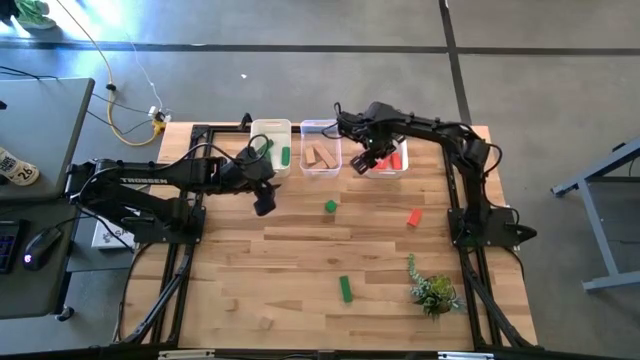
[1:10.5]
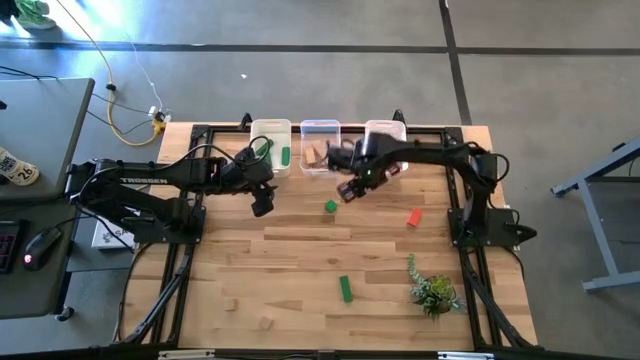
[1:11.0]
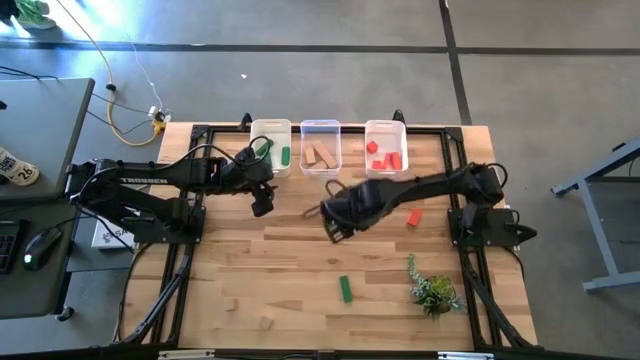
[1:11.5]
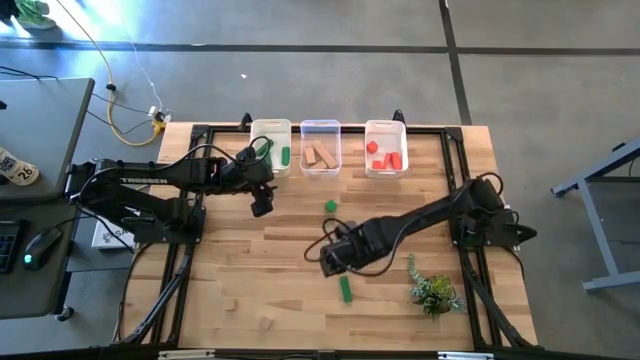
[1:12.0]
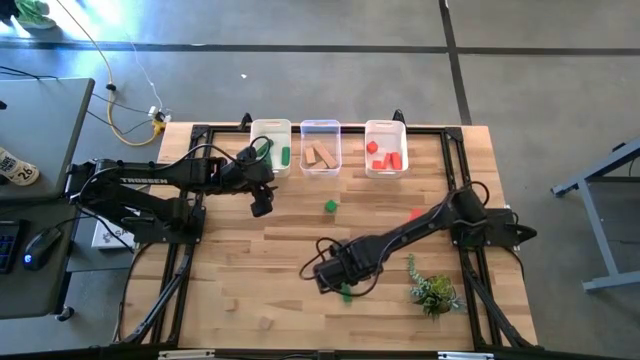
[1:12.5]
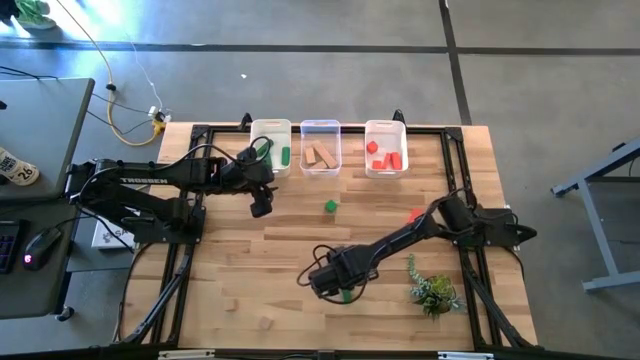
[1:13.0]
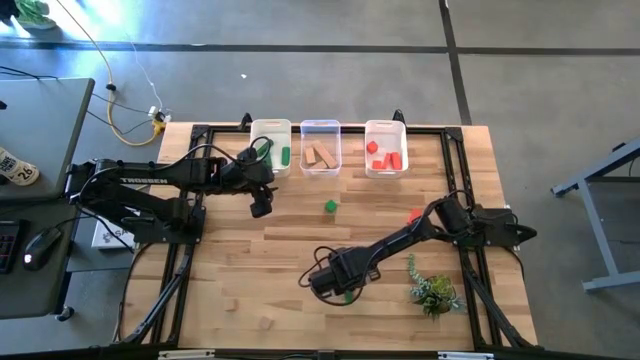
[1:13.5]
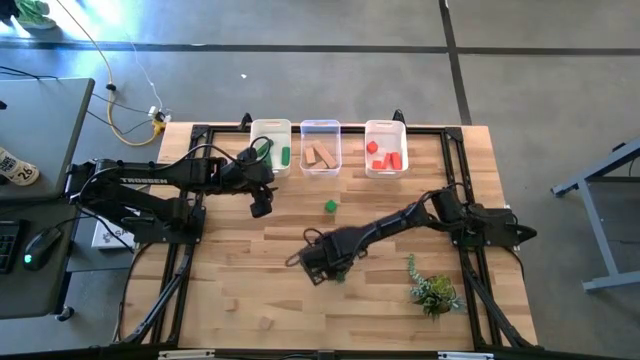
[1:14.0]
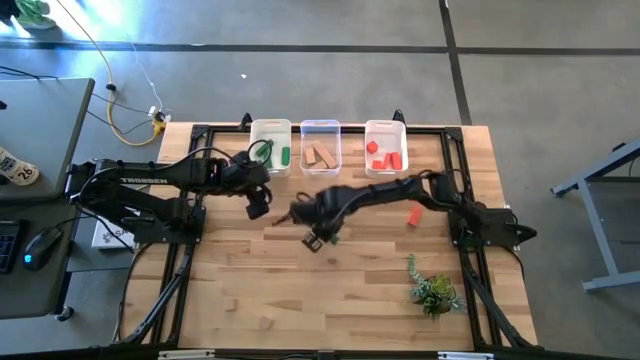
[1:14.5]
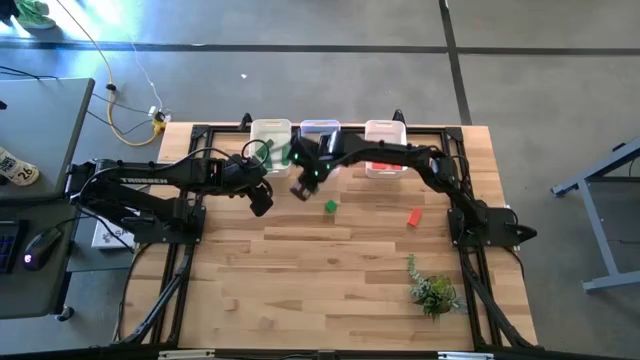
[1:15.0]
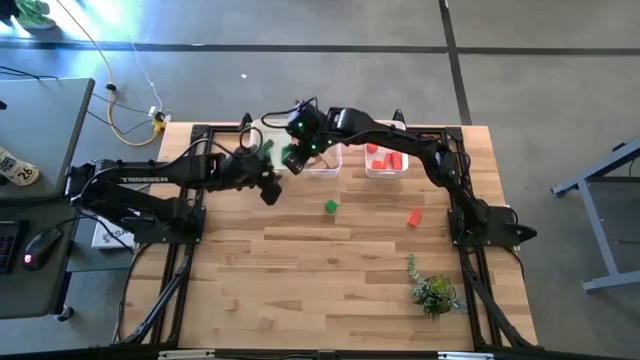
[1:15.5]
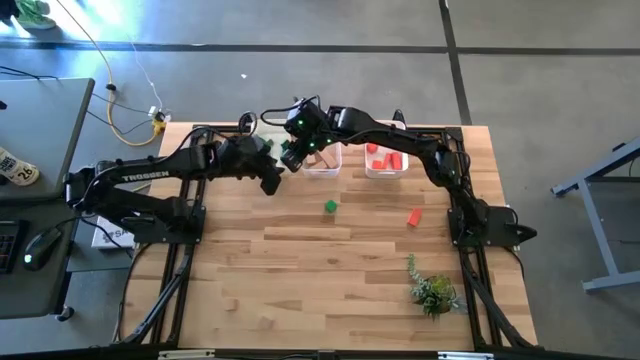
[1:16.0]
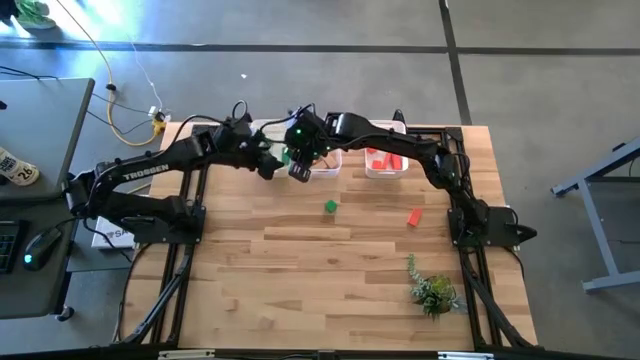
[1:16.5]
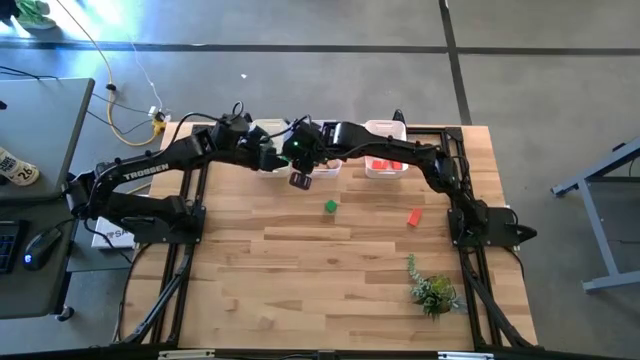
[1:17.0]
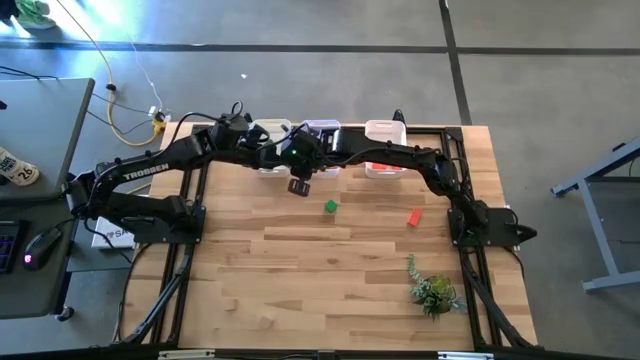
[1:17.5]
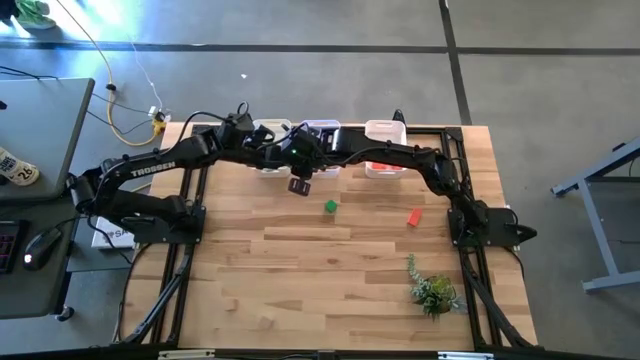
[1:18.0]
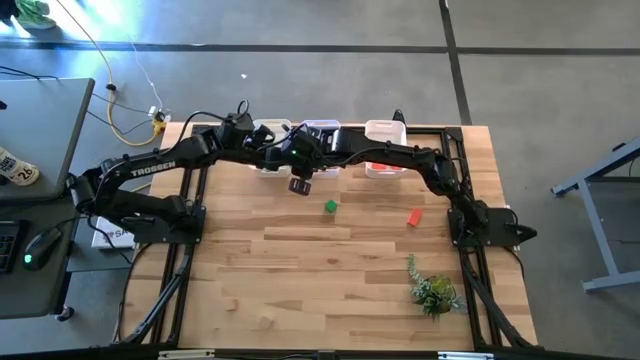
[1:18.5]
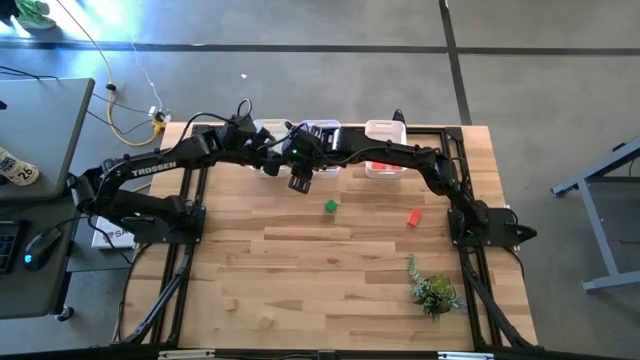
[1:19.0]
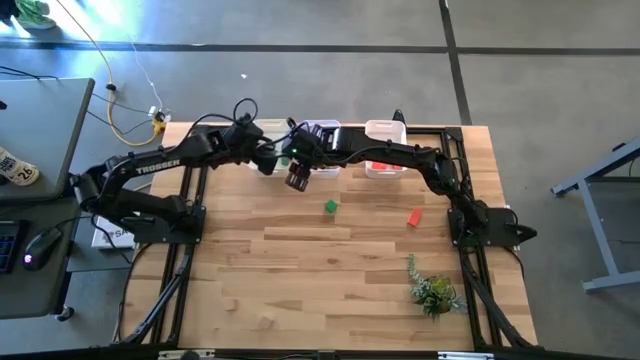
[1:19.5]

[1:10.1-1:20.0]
Task: Sort & place blocks by color
Put the green block into the left white bin

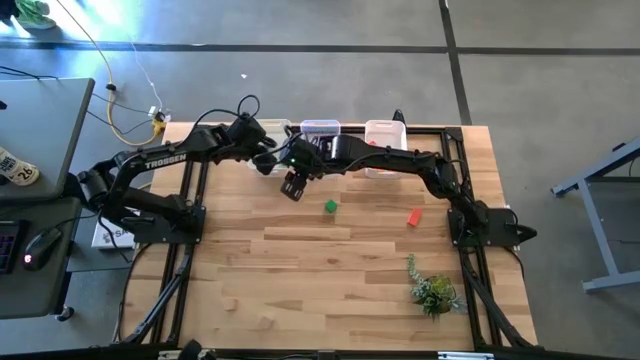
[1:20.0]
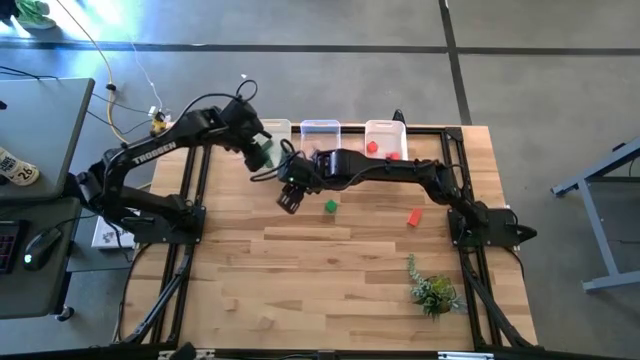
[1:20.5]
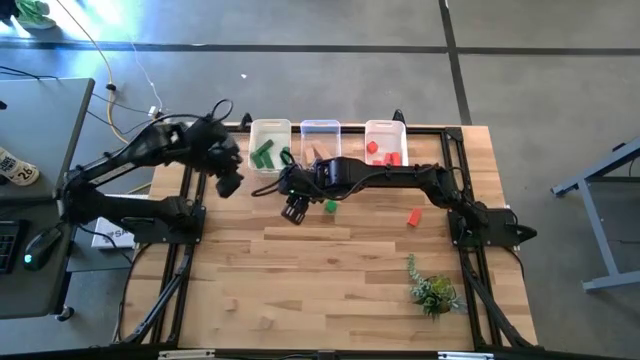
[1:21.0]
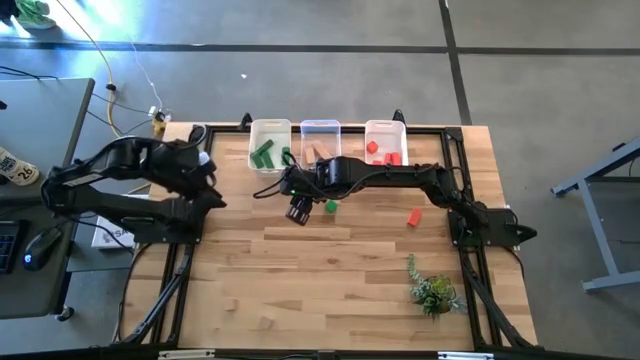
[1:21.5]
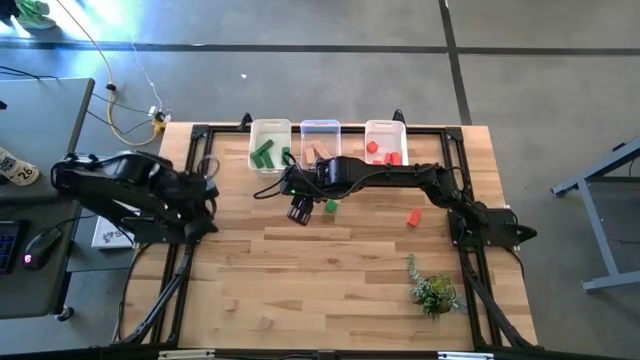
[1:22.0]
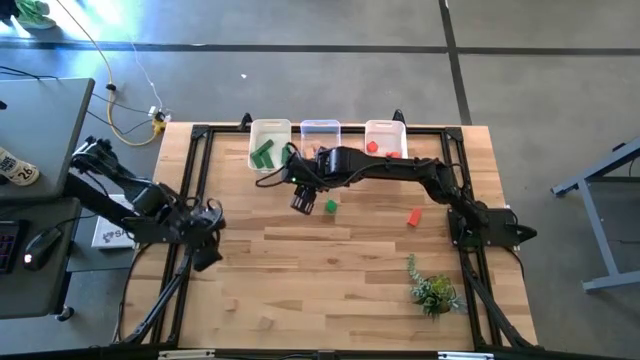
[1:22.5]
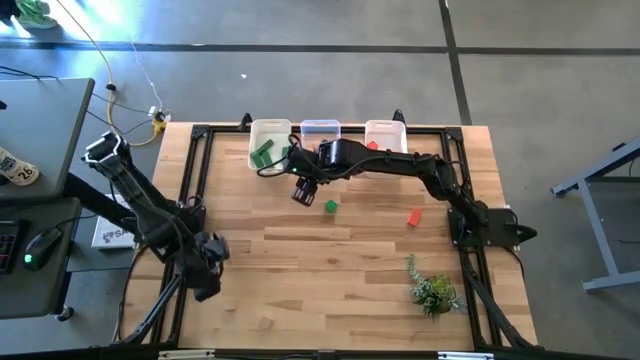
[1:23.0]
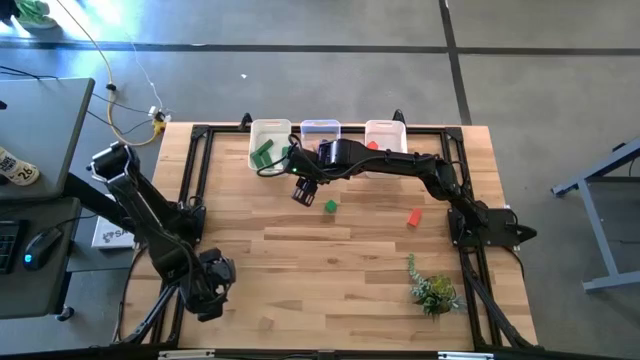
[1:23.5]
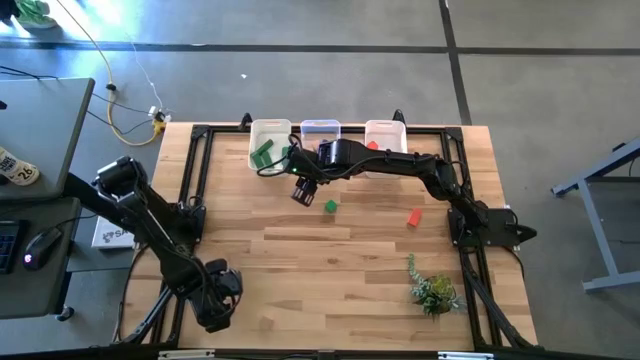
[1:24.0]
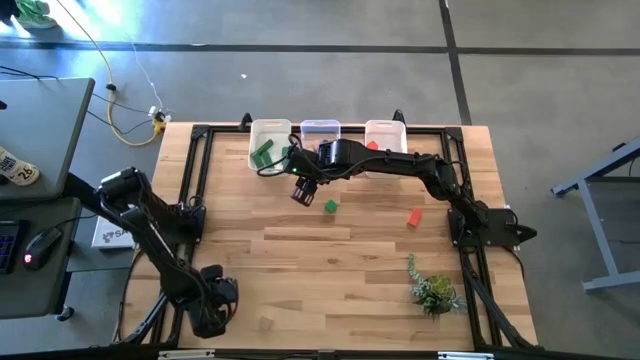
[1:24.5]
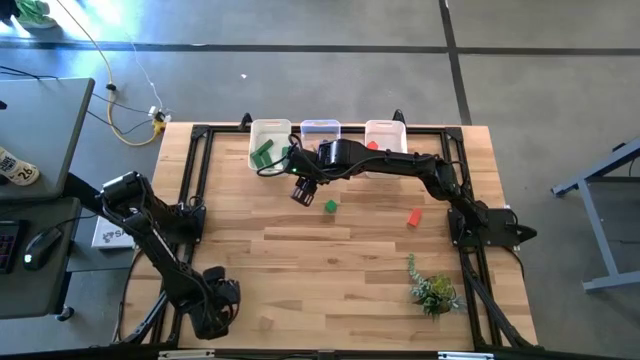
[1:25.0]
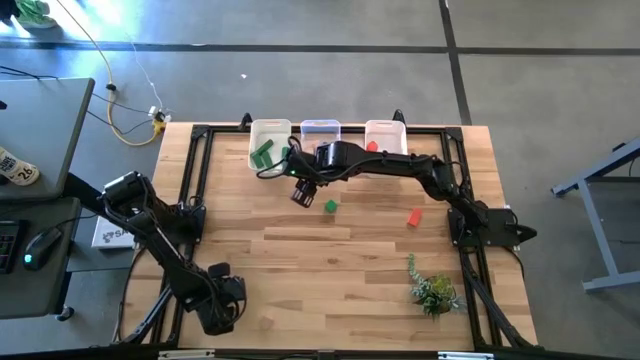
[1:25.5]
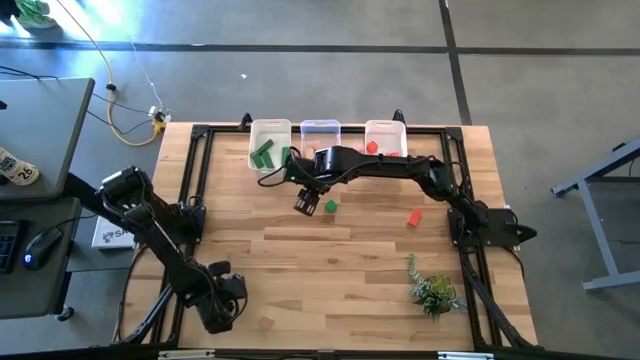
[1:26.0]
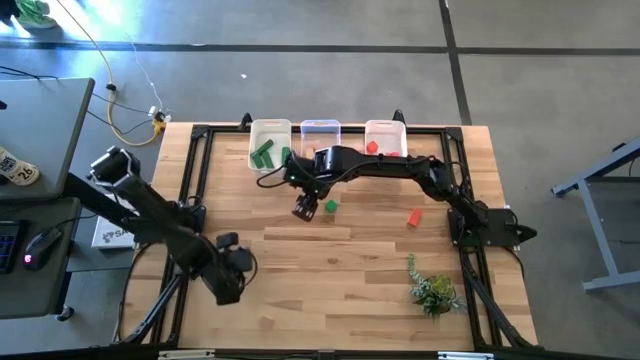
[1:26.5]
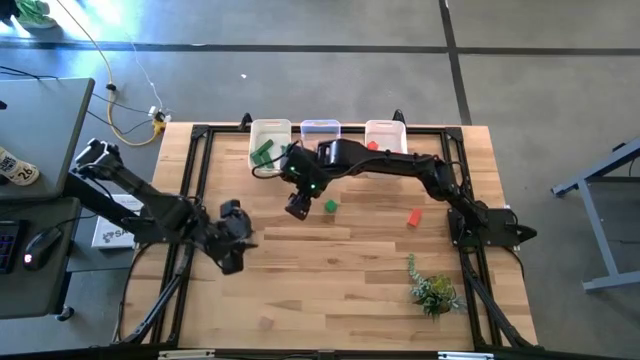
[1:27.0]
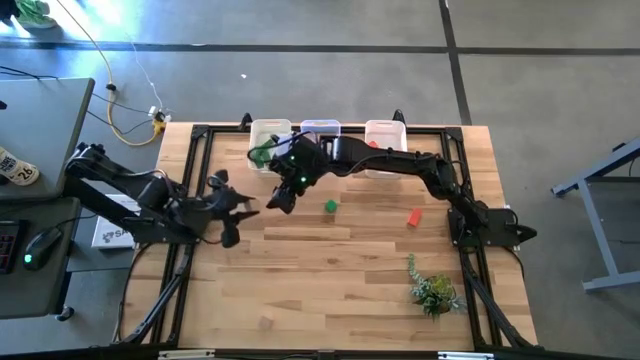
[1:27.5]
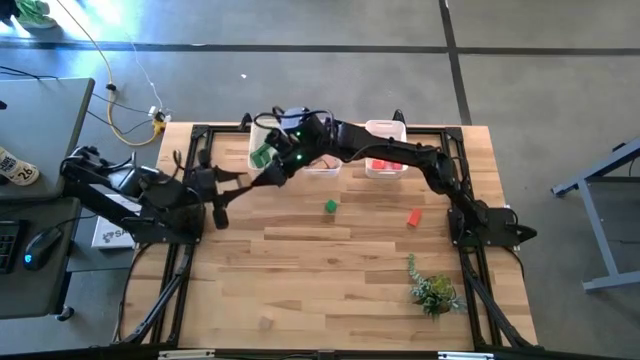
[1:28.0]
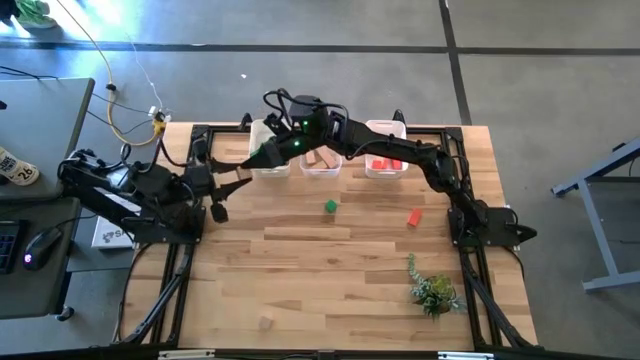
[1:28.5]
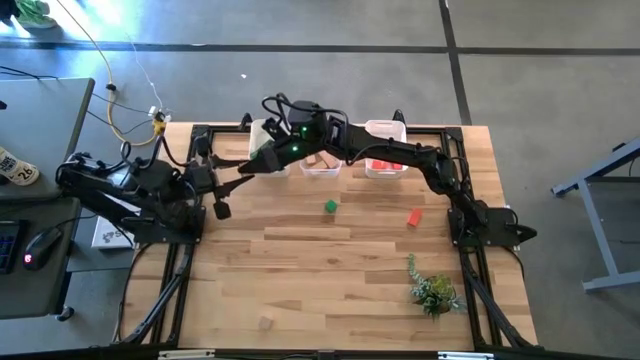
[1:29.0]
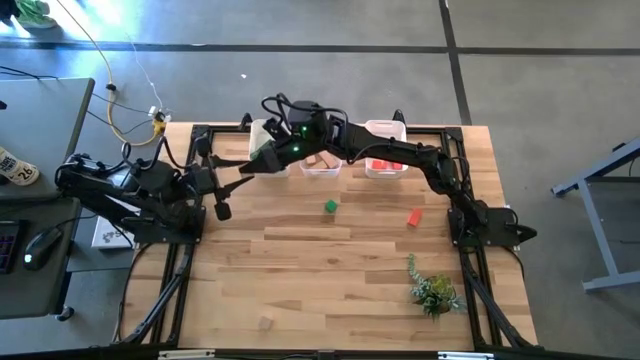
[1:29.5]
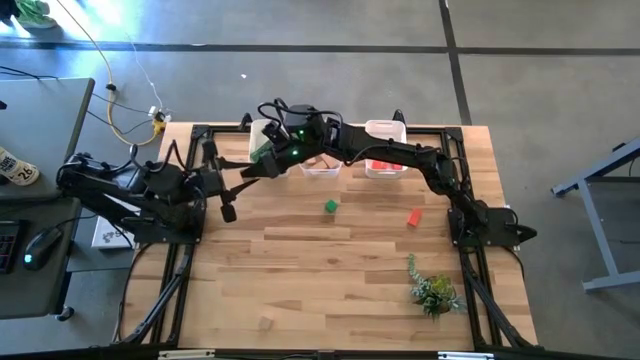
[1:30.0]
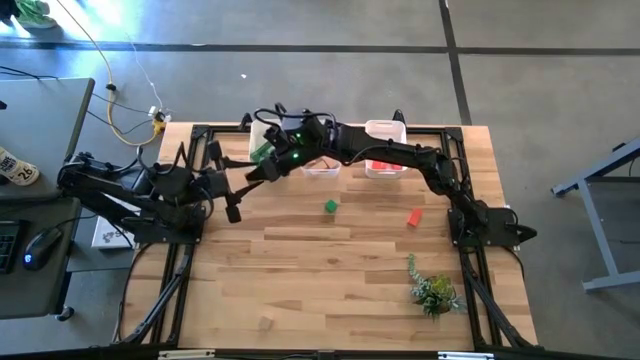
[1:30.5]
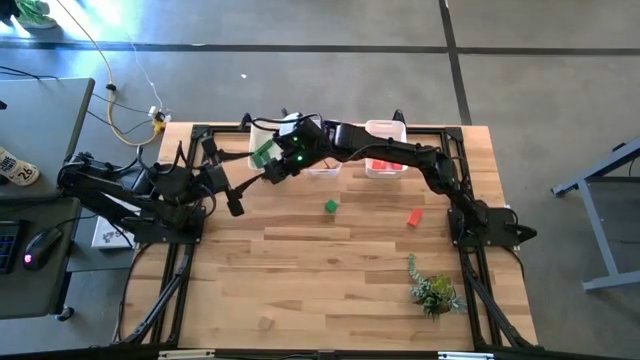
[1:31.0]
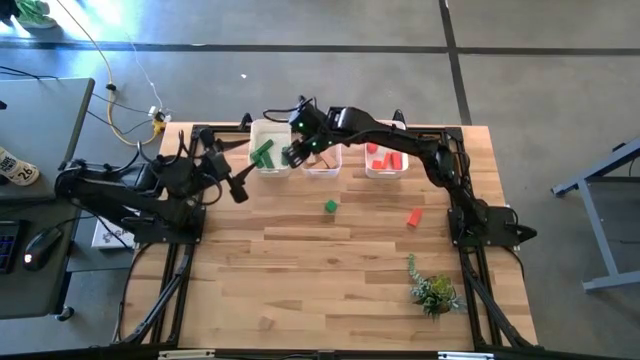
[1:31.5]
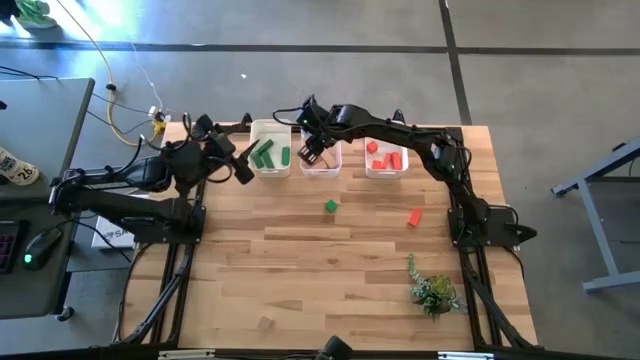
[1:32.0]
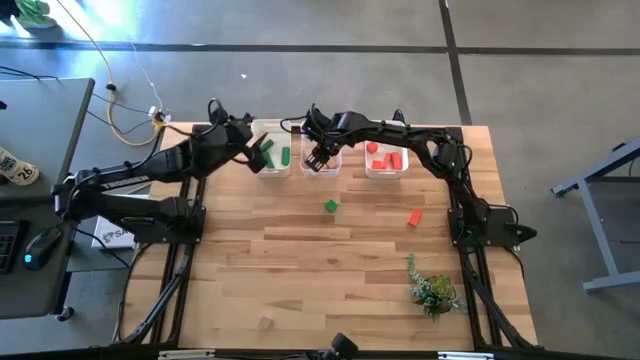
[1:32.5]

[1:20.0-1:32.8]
Put the brown block into the transparent bin
